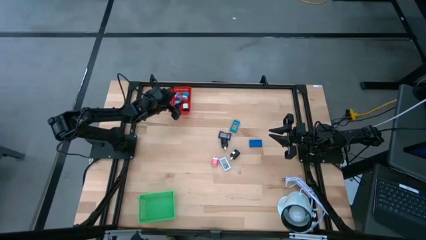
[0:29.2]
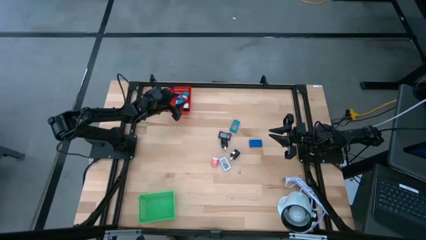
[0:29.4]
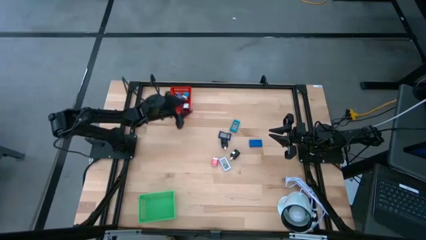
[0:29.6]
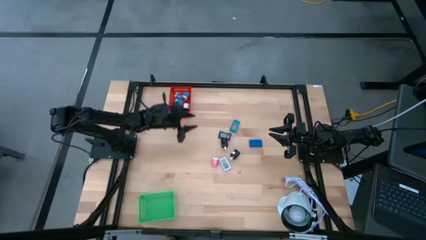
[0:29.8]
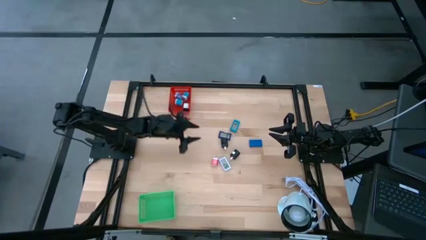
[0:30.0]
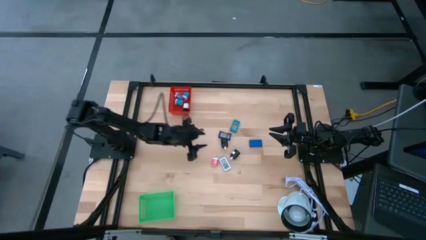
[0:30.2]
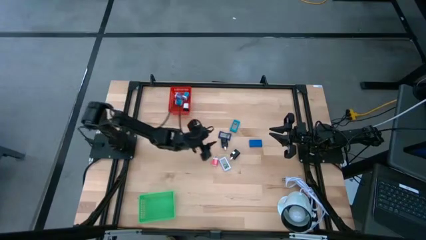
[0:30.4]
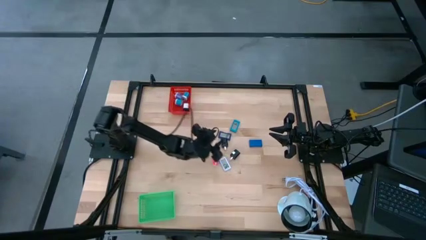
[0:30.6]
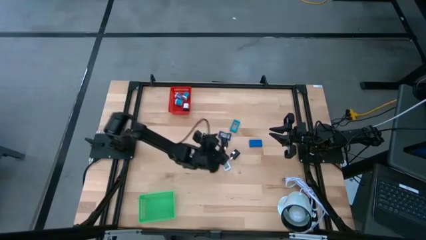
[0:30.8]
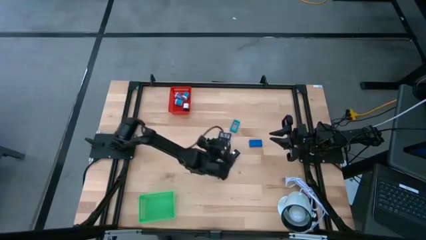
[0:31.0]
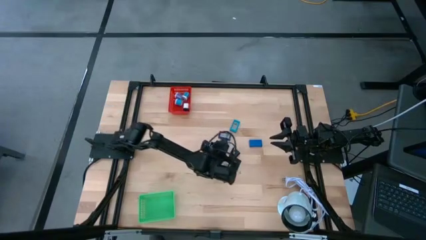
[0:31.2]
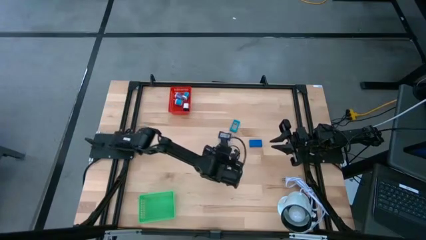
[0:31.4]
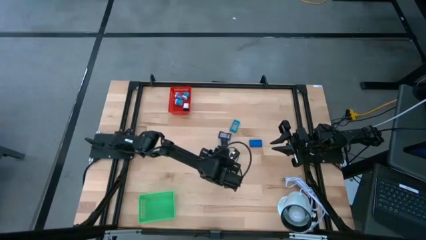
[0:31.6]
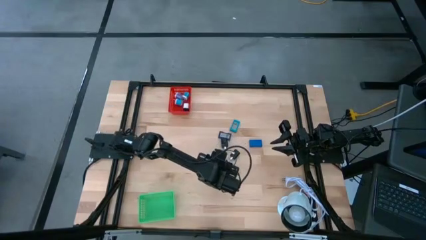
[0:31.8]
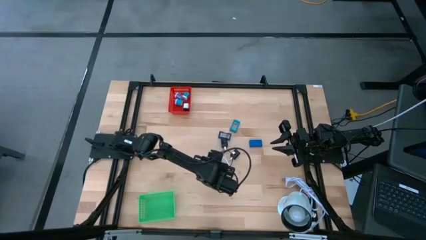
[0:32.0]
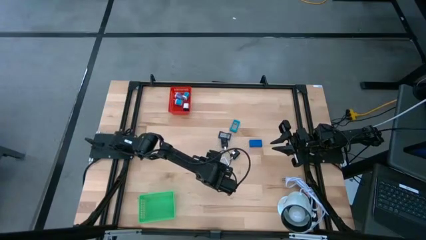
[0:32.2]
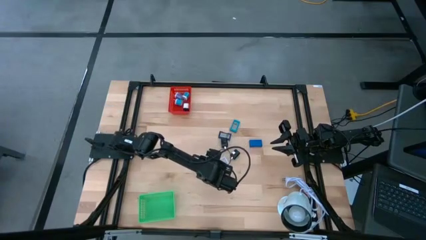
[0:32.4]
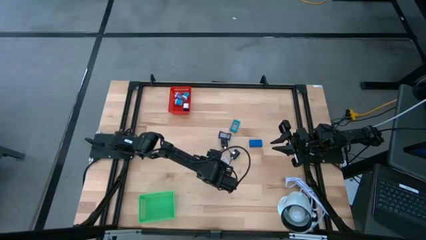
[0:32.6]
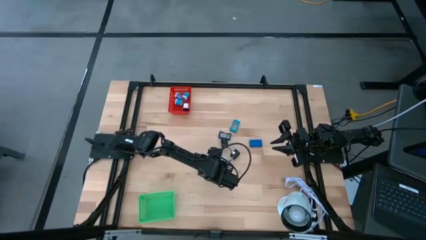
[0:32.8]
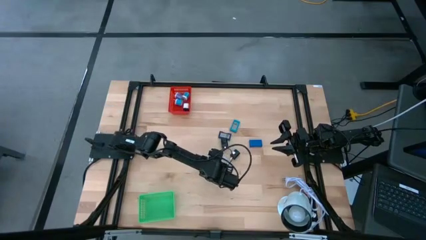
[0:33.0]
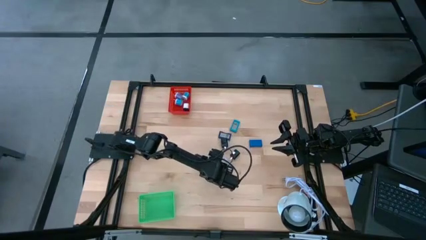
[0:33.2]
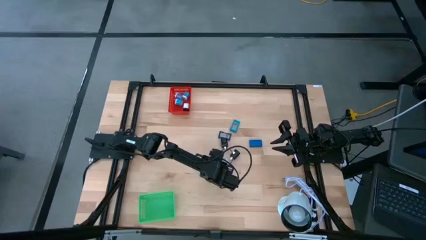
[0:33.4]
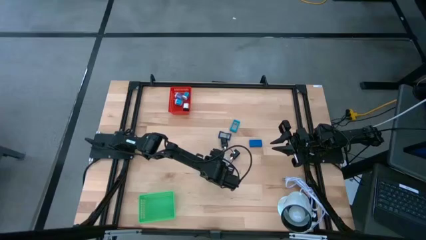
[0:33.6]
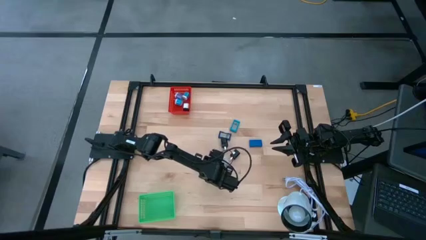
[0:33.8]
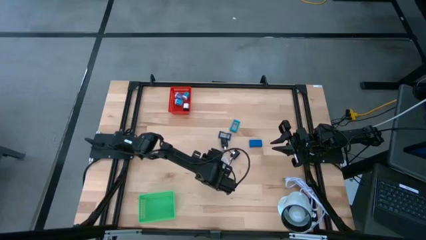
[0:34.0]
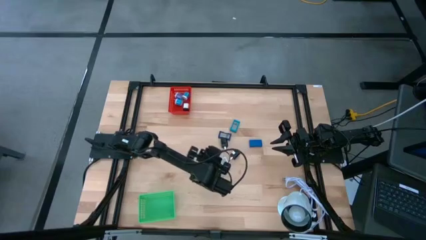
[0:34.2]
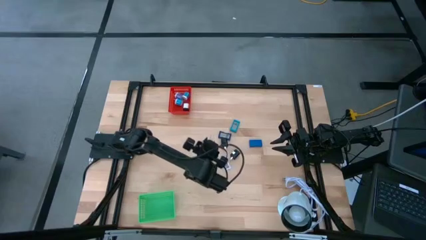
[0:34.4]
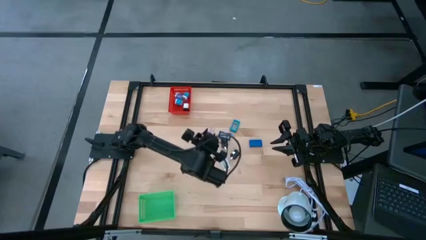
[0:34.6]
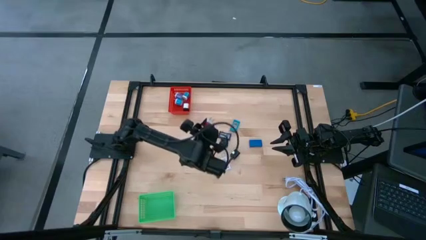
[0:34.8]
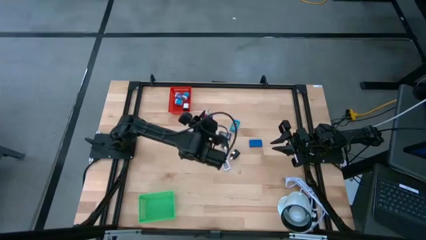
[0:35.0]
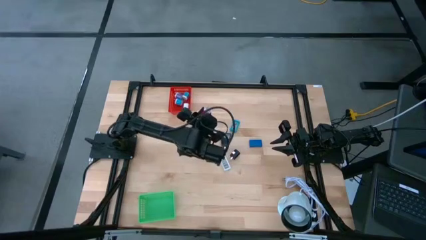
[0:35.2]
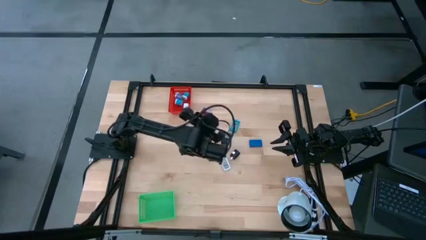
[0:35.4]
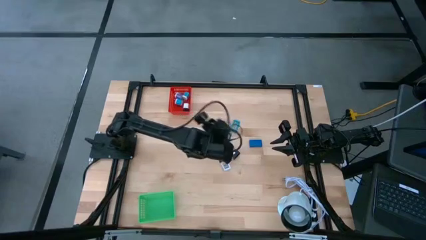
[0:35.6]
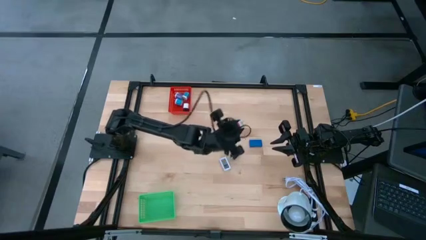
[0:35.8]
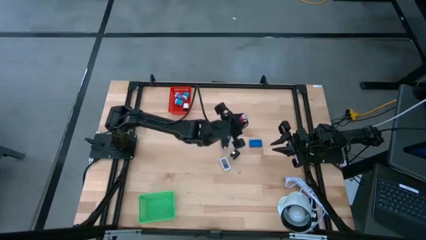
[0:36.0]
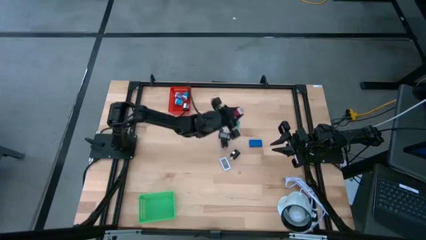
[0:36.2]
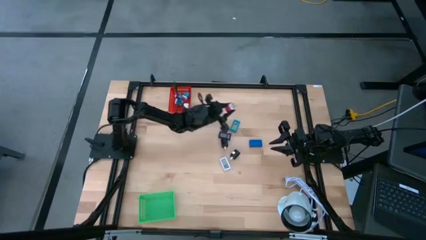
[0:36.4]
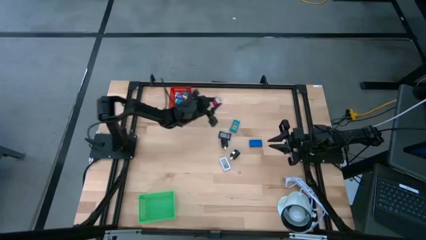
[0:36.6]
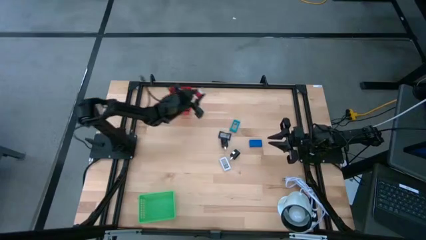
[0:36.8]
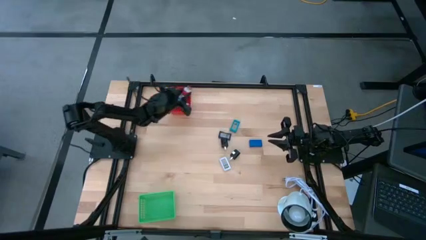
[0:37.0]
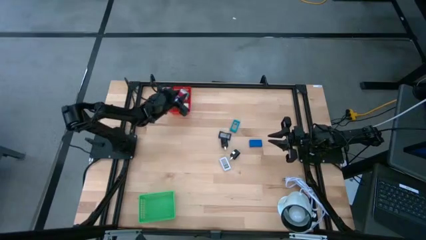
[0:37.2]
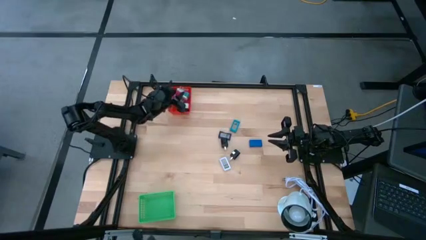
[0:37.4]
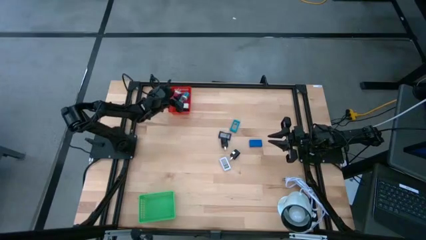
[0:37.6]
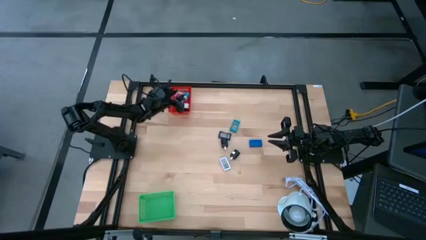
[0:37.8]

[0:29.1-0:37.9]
Task: Pick & Place Office items
Put the red charger adapter into the red bin

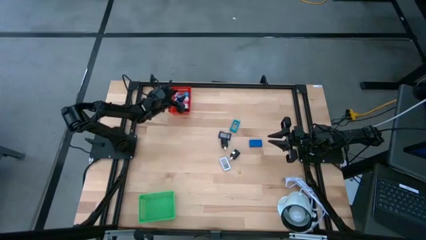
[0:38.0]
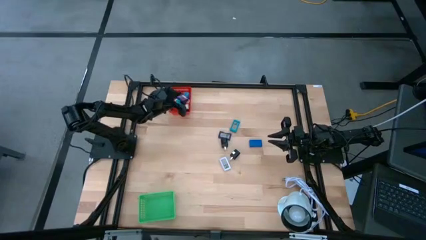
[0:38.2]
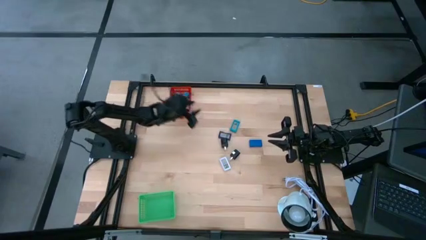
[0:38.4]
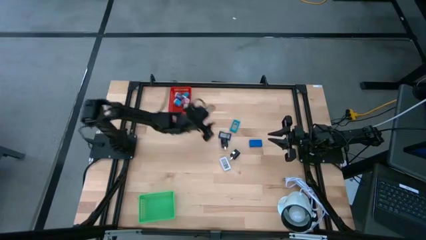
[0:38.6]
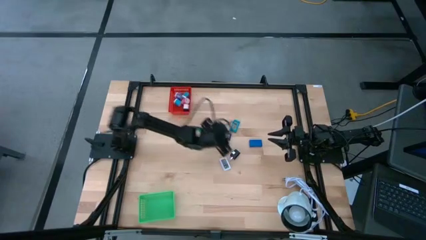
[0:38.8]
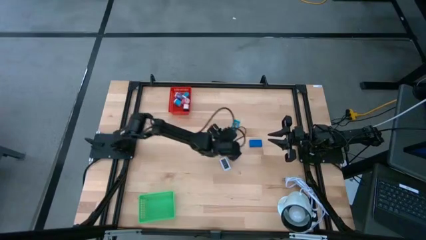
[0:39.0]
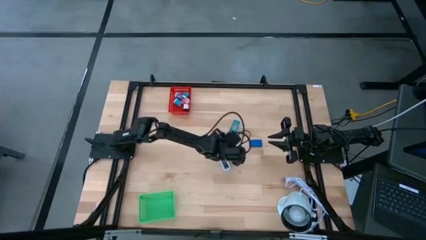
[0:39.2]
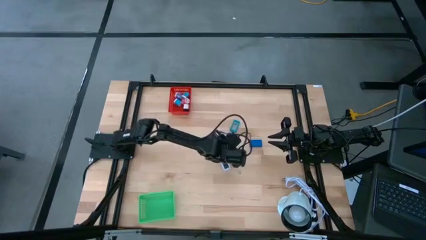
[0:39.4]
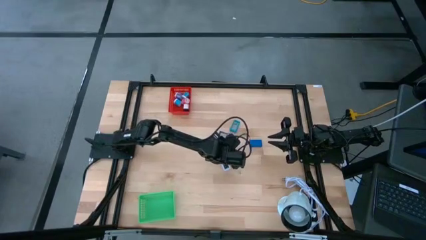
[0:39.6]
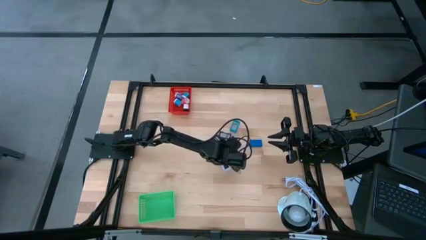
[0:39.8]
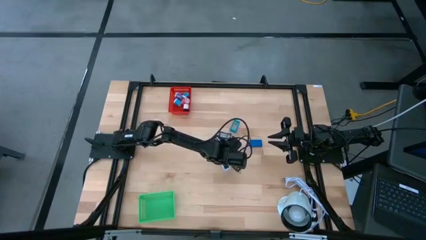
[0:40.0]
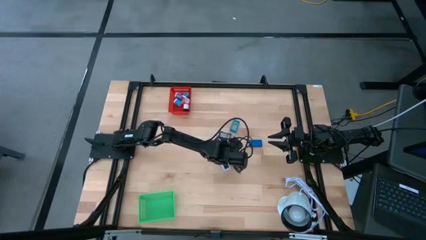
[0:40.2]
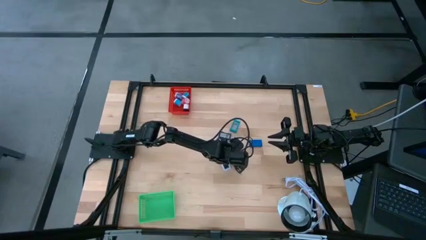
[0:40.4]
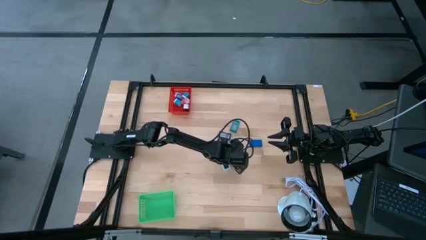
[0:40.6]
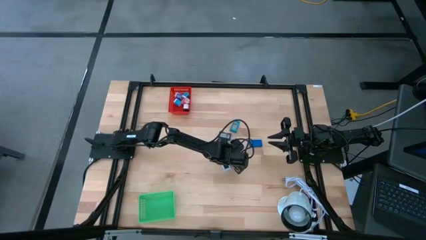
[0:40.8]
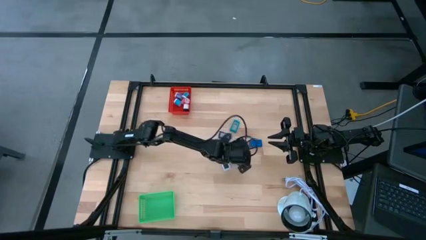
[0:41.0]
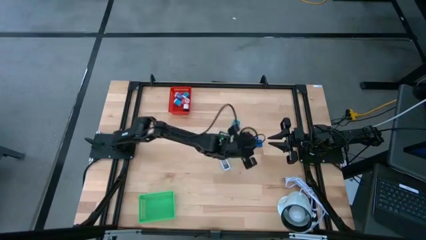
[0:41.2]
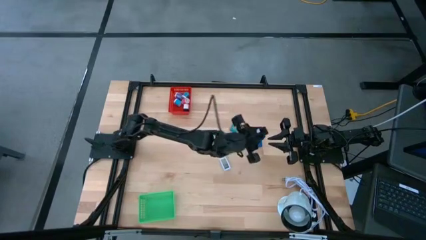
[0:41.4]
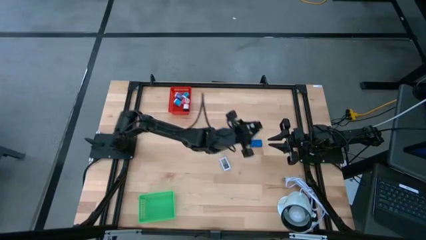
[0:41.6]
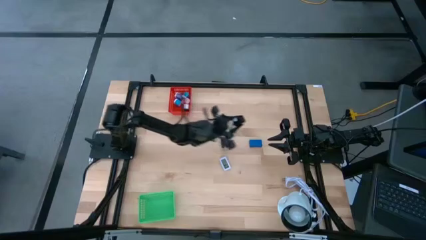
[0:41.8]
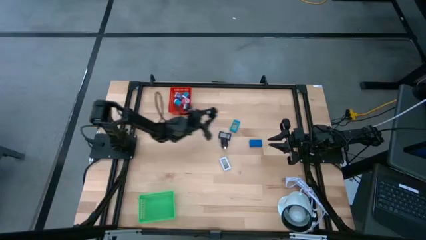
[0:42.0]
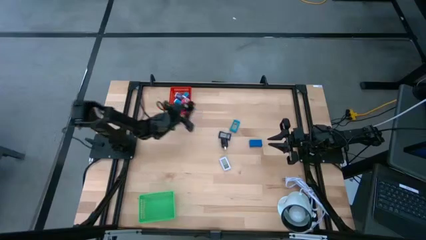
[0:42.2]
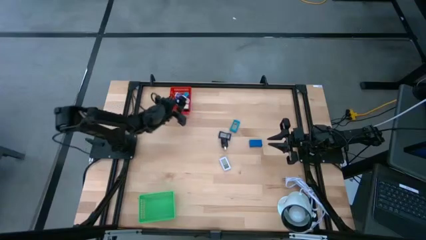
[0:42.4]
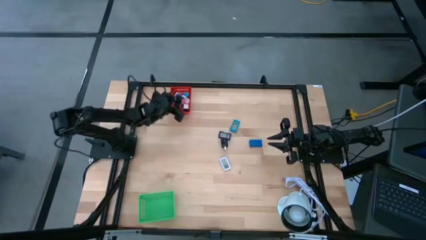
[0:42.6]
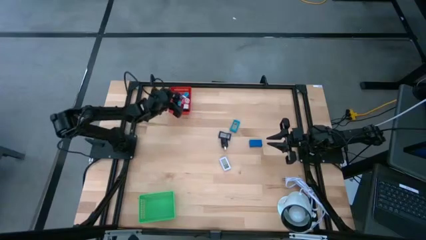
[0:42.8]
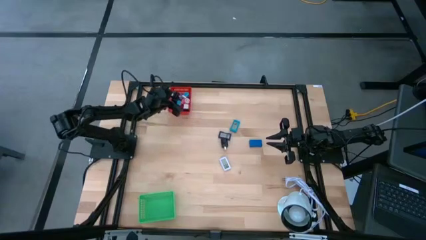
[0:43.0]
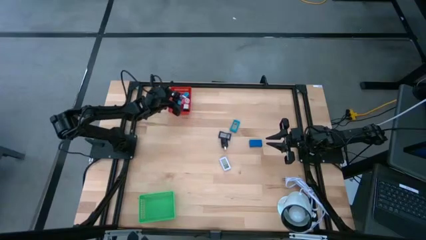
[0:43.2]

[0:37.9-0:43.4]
Put the right black charger adapter into the red bin
